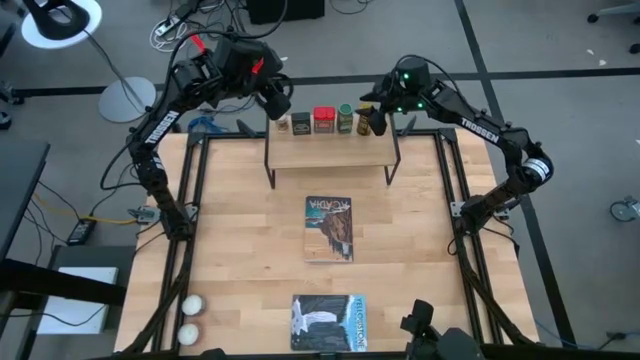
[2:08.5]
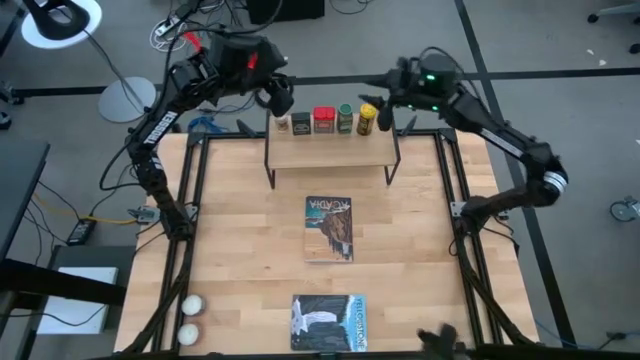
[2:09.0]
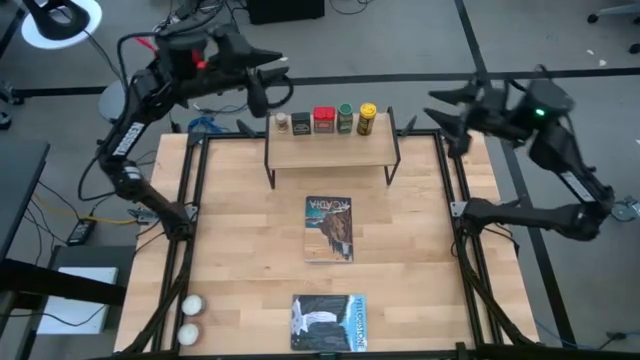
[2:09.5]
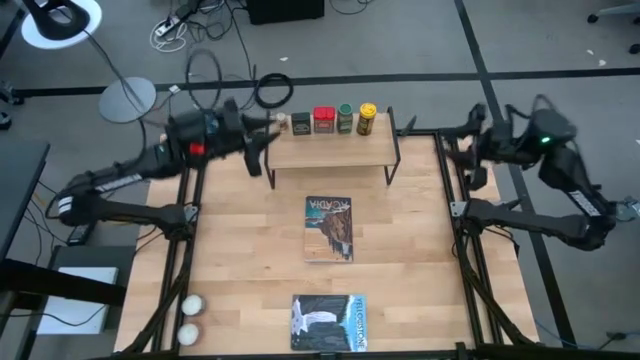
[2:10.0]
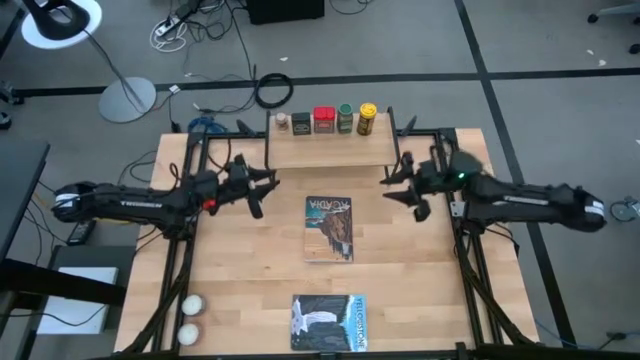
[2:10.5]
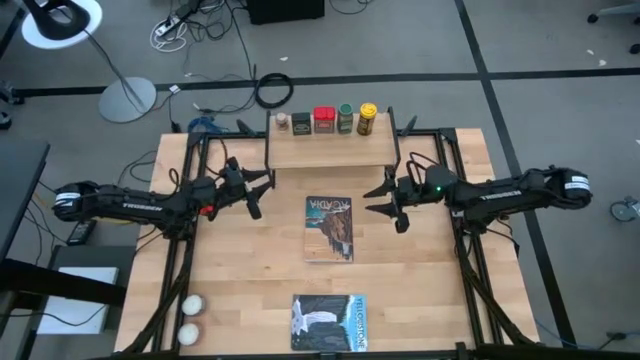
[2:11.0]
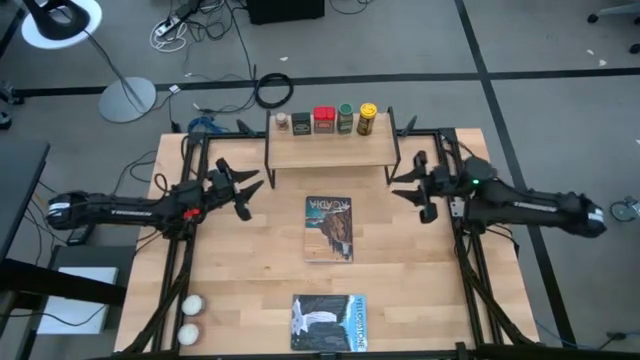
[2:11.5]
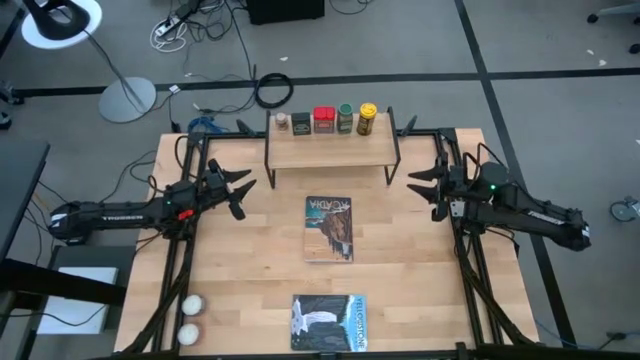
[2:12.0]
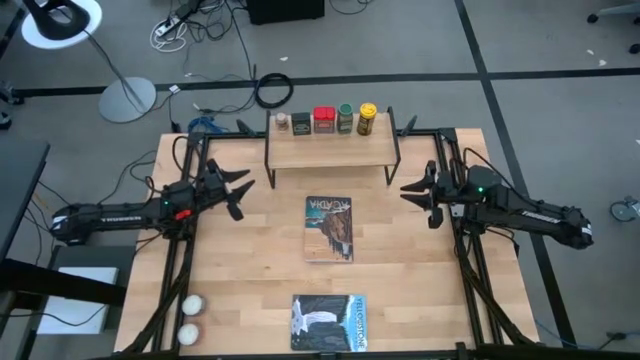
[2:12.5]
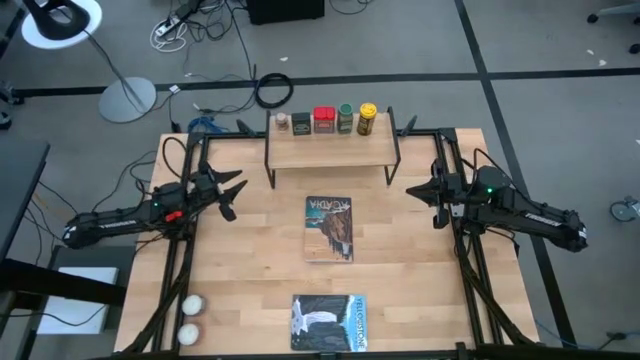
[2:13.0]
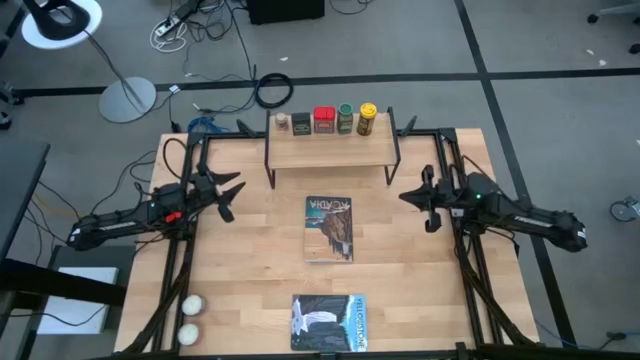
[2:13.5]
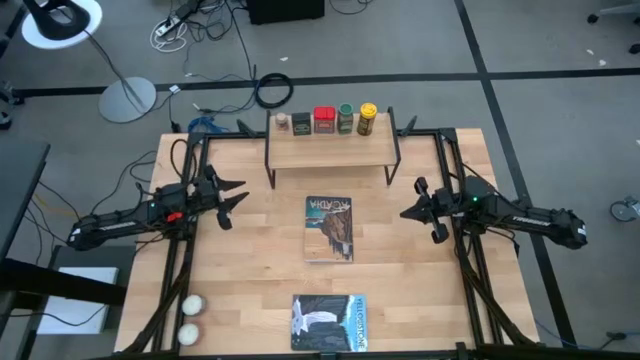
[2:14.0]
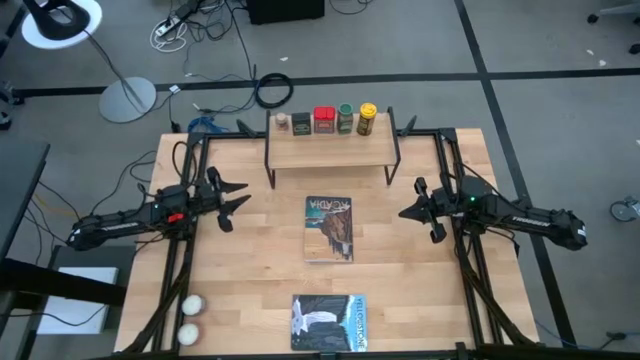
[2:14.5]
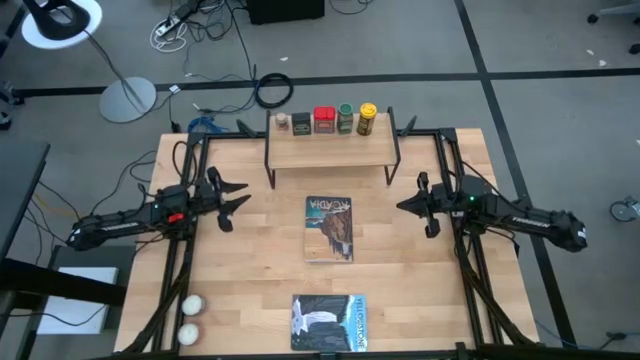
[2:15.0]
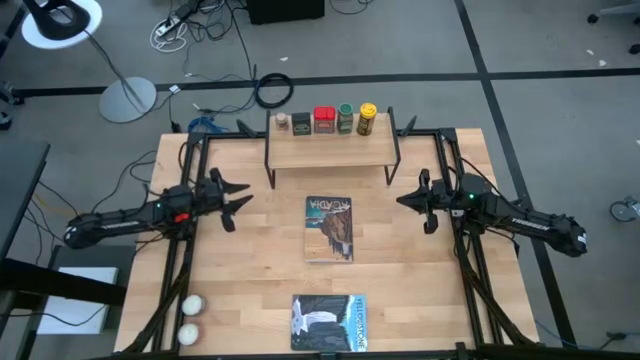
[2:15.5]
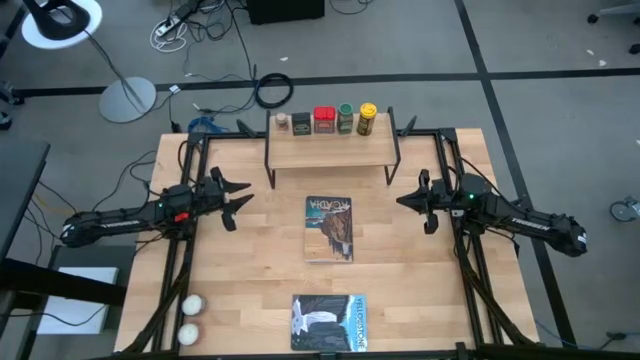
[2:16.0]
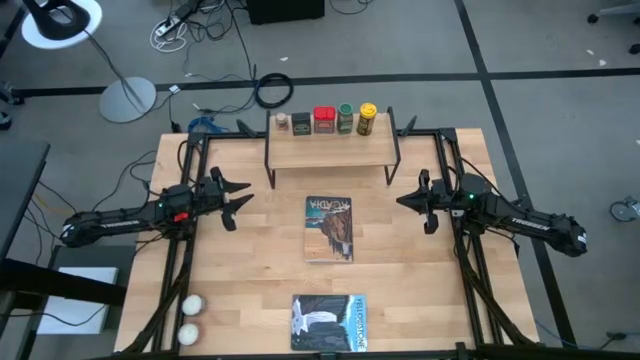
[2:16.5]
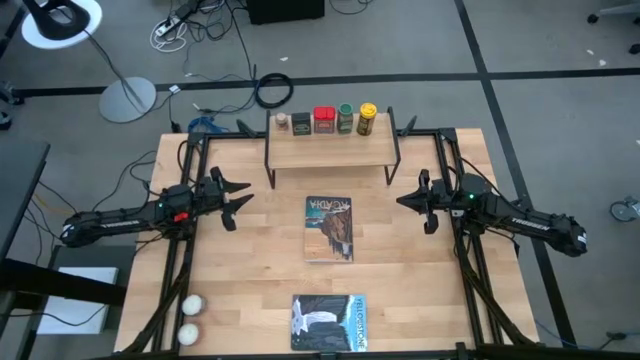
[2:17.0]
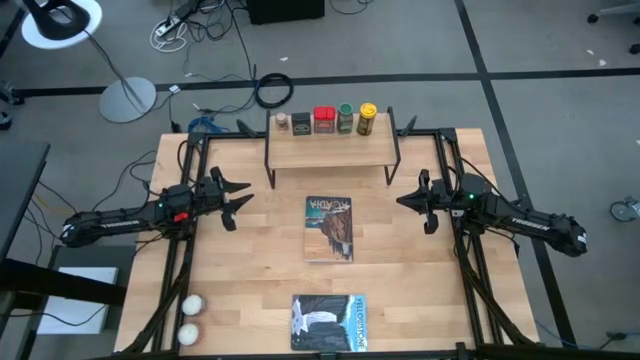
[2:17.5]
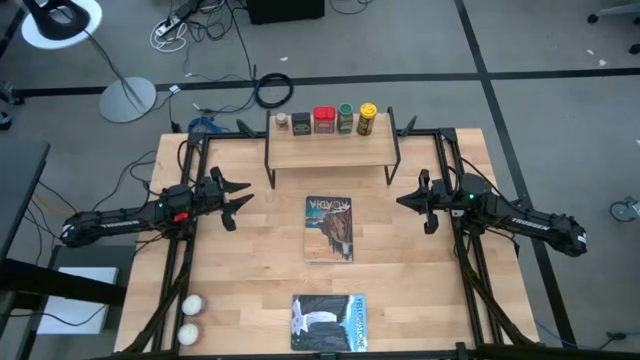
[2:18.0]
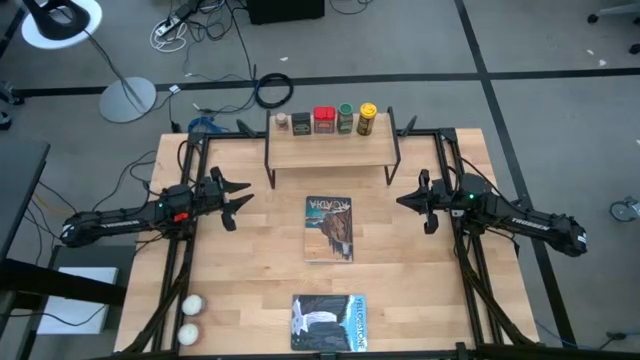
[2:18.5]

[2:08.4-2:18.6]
Task: Shelf spices
Return to Home Position

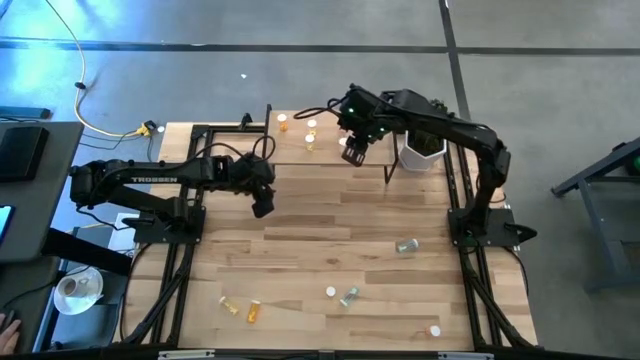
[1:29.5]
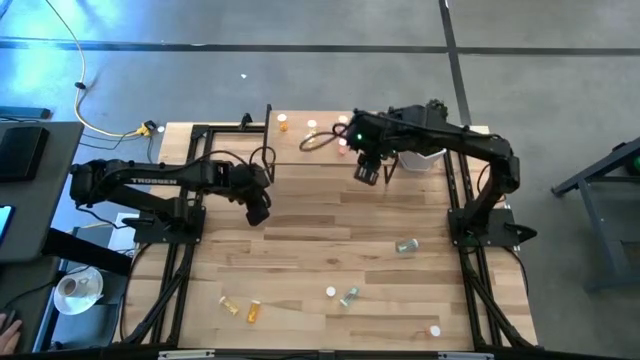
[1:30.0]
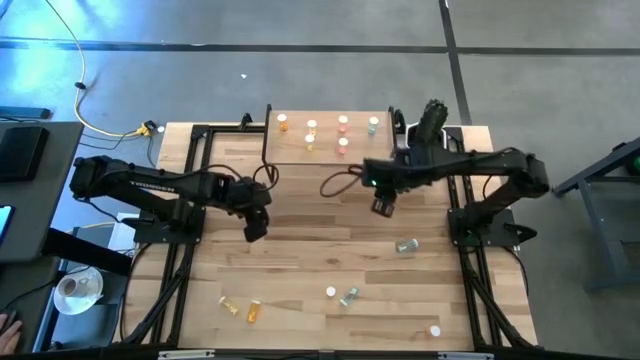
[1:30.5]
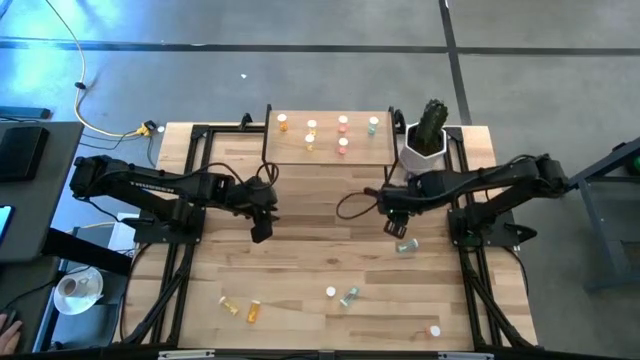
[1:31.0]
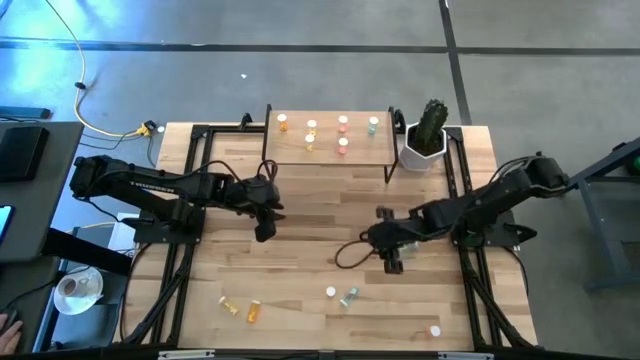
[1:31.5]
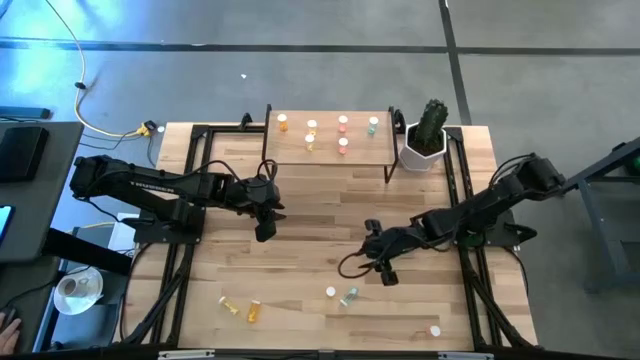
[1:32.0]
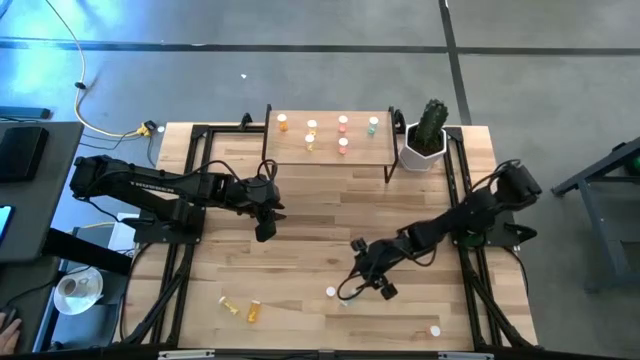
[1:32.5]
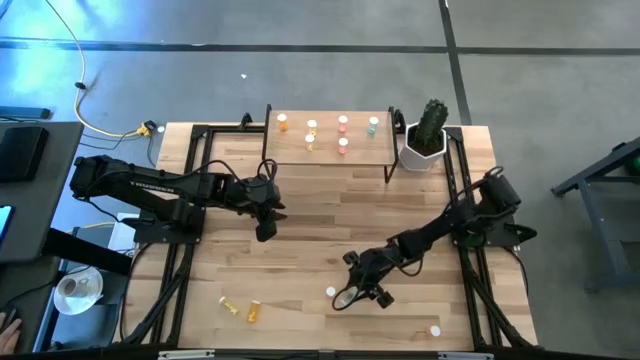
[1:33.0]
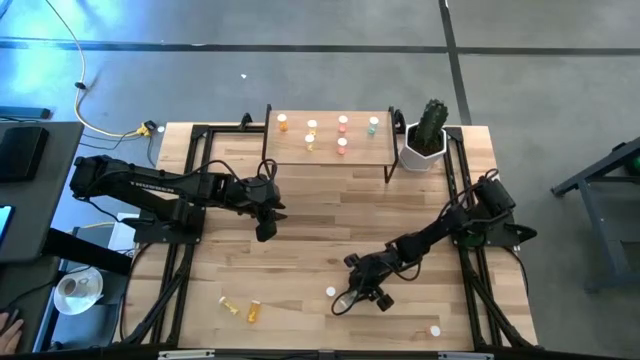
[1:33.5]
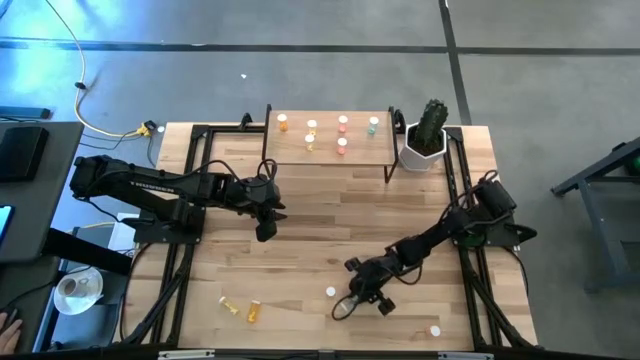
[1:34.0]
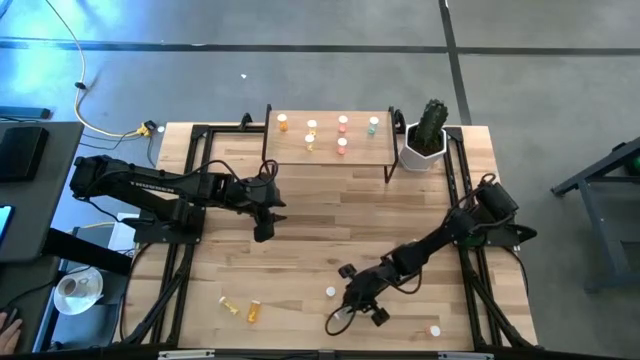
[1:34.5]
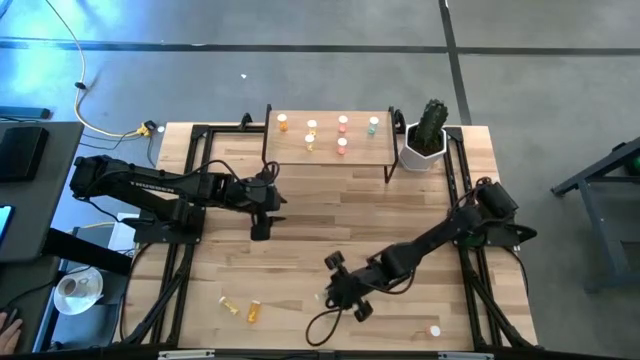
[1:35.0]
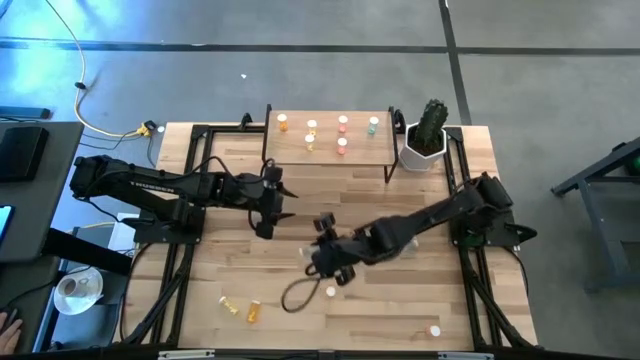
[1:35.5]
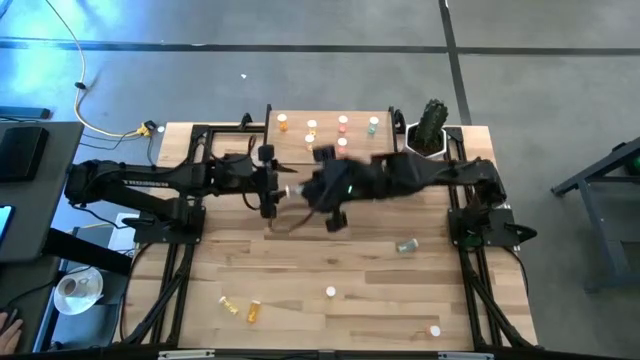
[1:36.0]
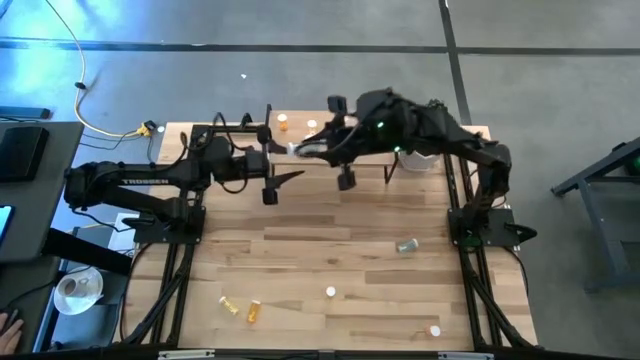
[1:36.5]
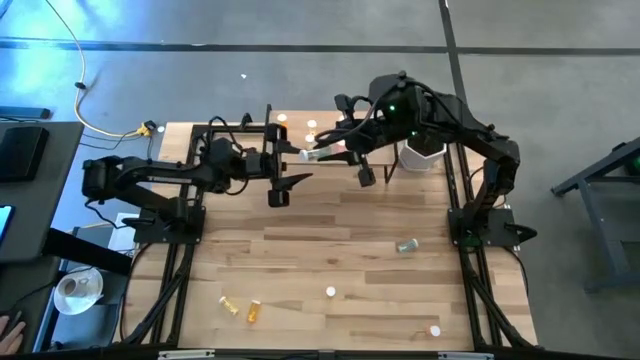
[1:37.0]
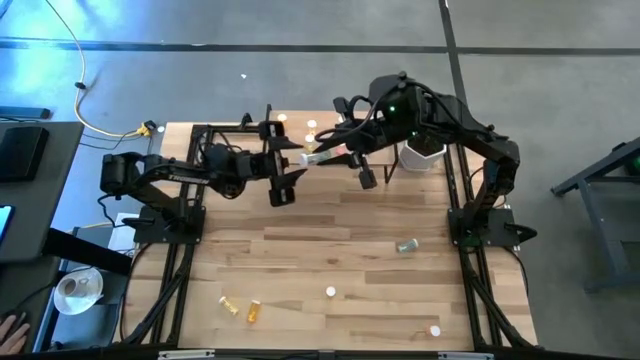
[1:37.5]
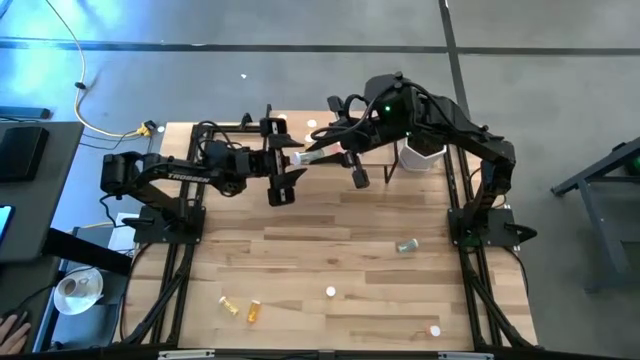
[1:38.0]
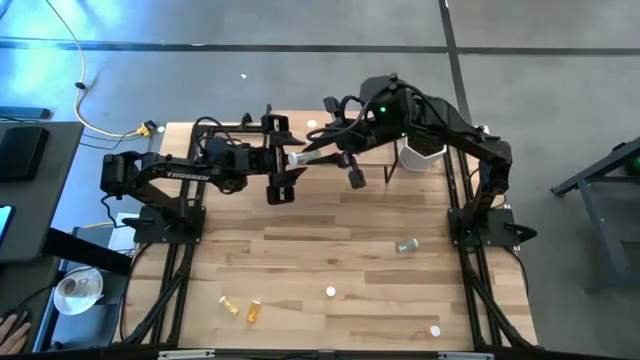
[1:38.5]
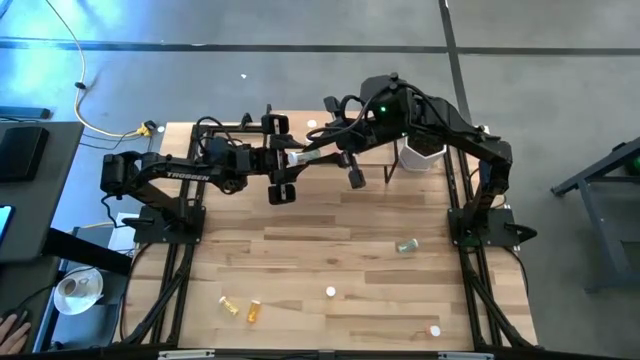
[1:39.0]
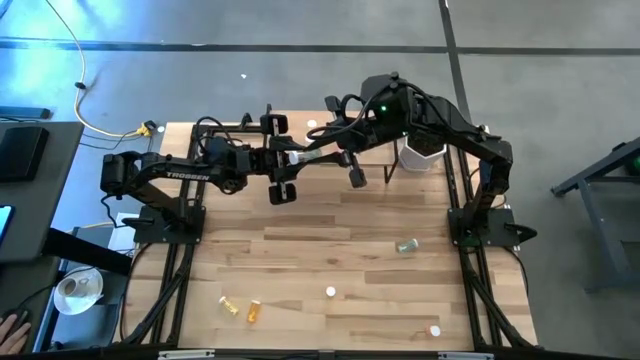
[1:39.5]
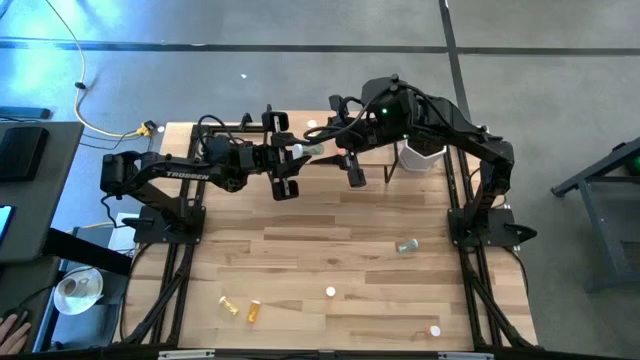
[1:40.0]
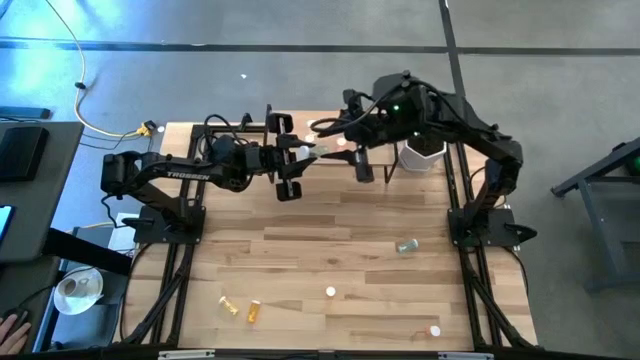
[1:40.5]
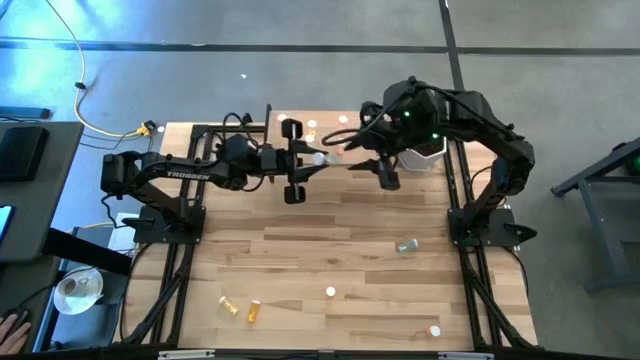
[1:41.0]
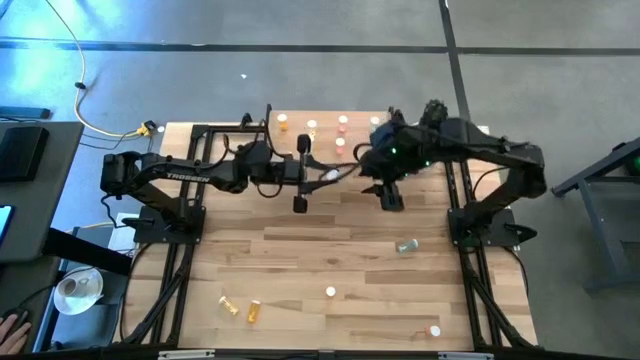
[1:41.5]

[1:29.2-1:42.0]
Task: Pick and place medicine bottles onto shelf by color
Put the bottom blue pill bottle on the shelf aligned with the other blue pill bottle
